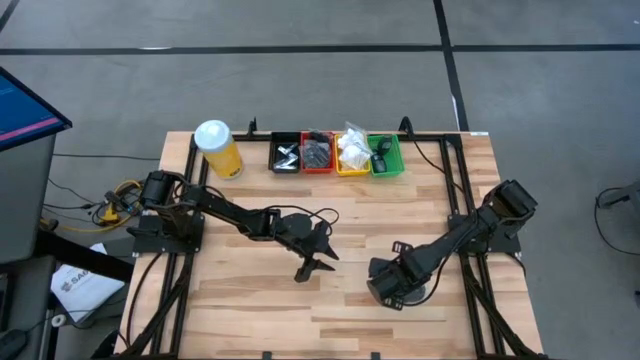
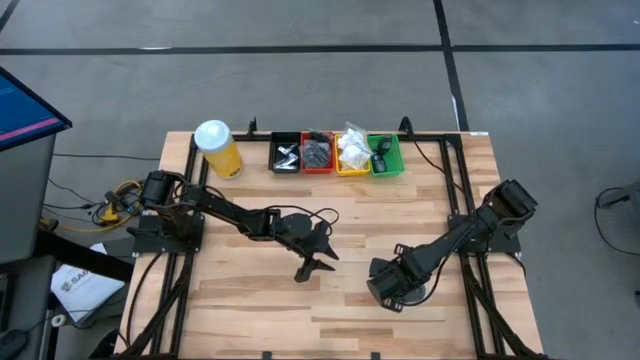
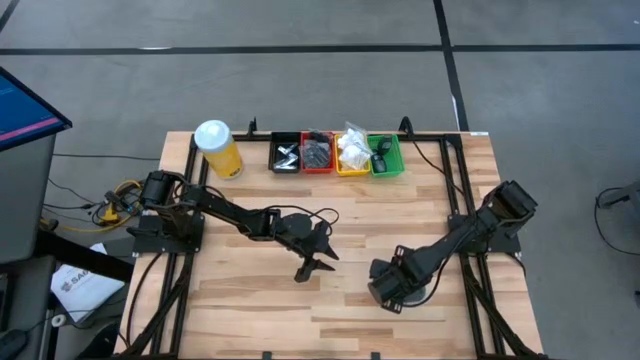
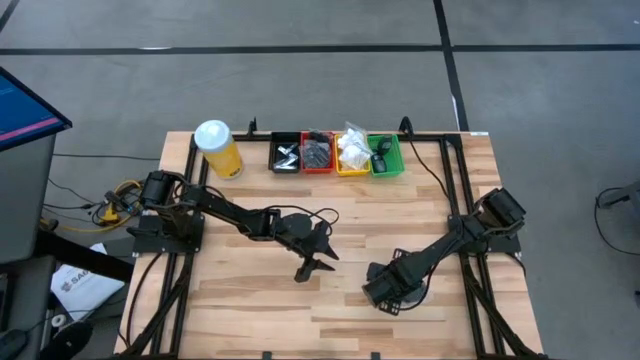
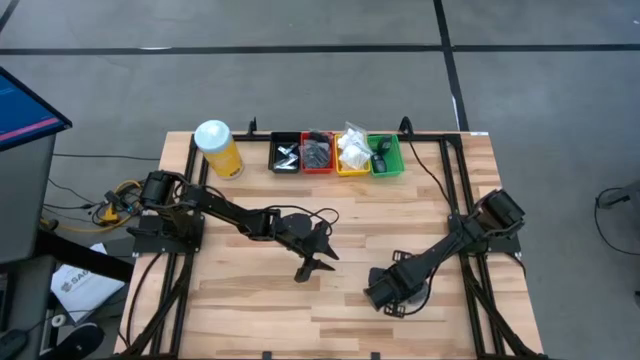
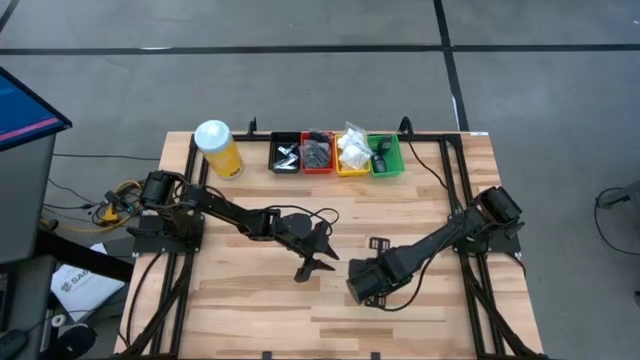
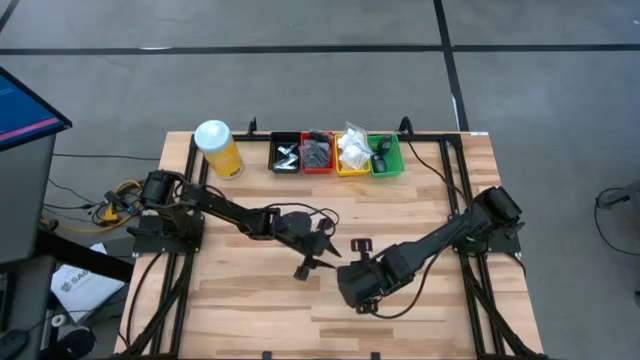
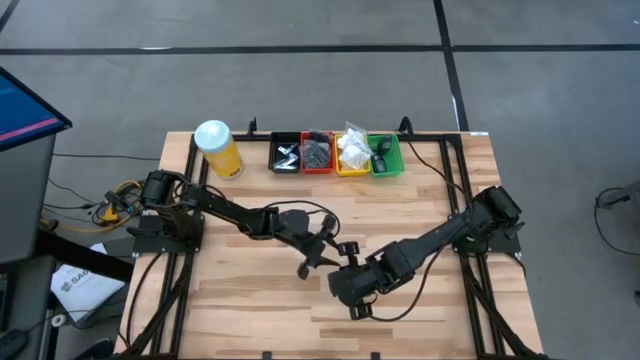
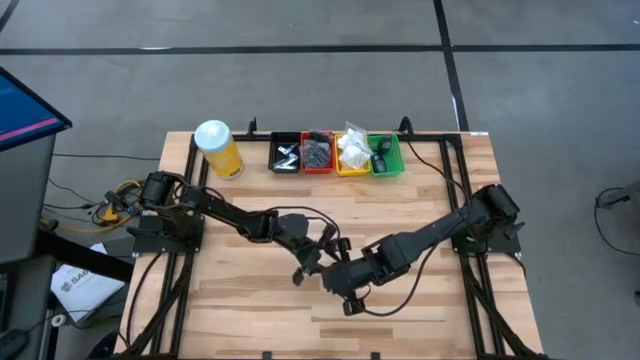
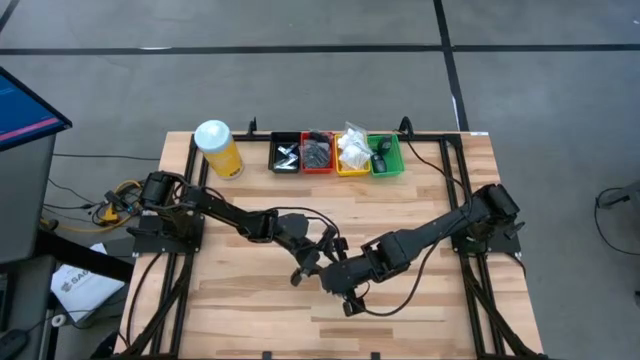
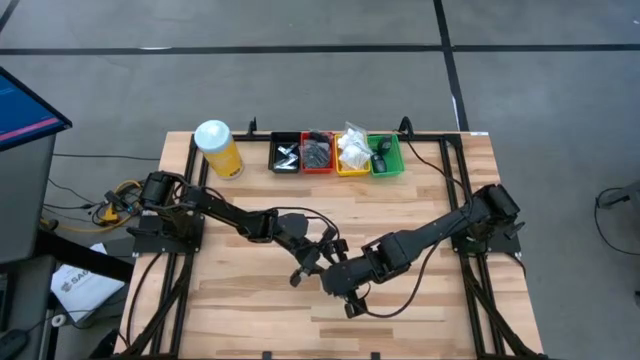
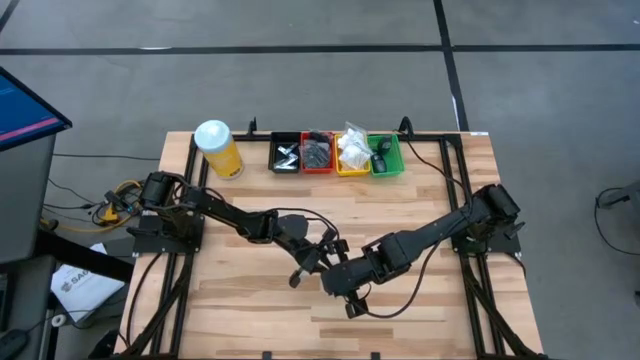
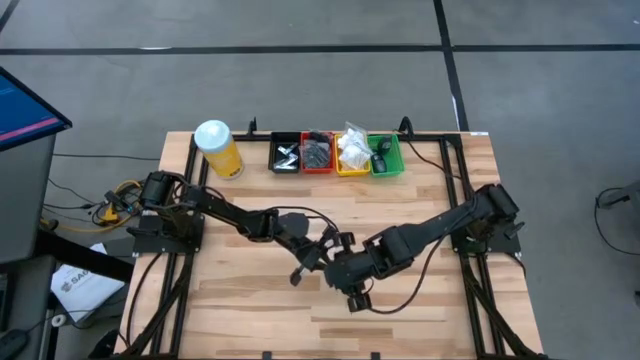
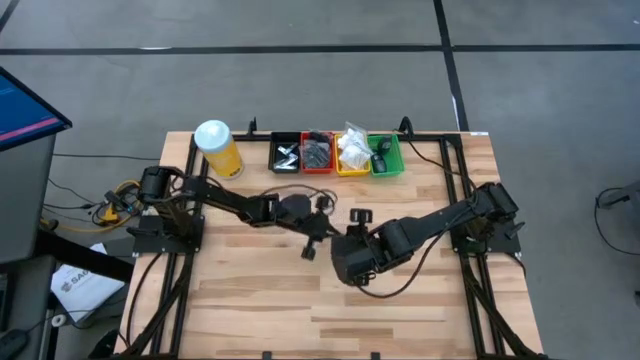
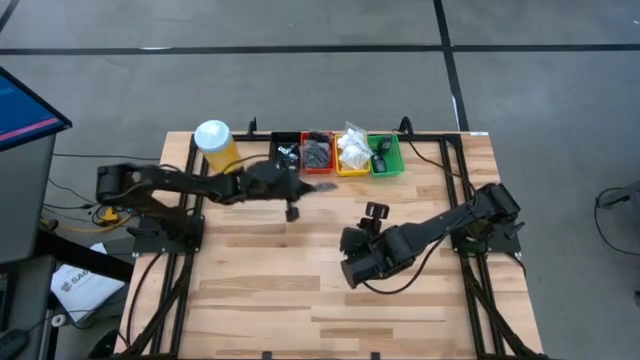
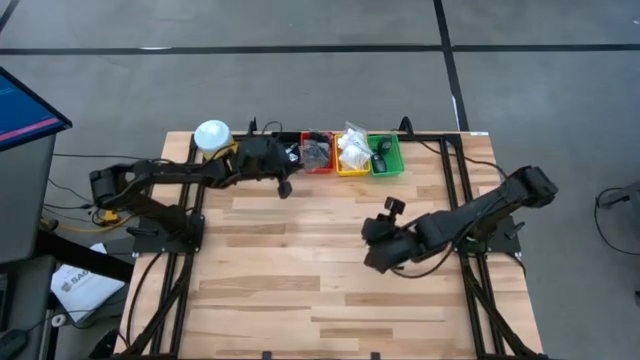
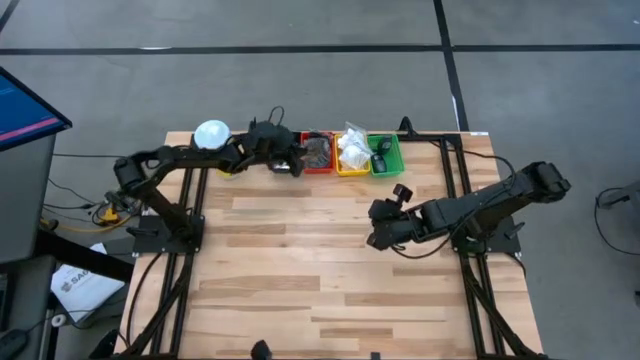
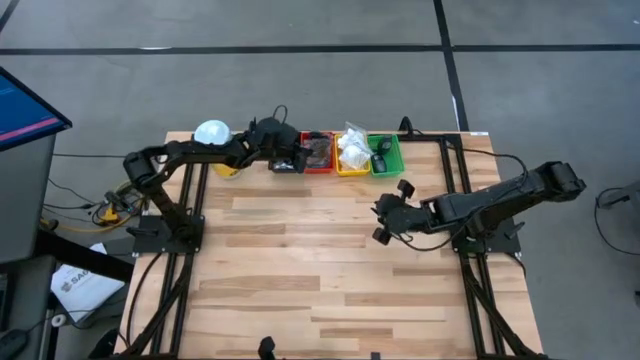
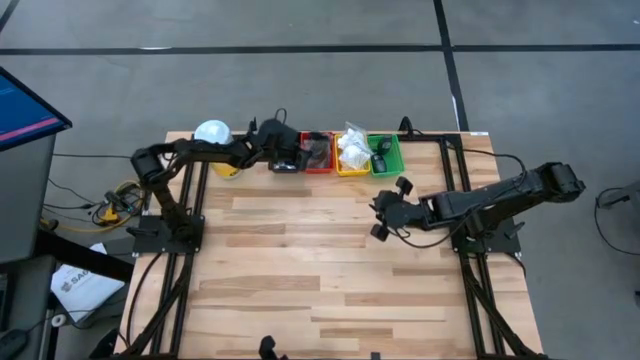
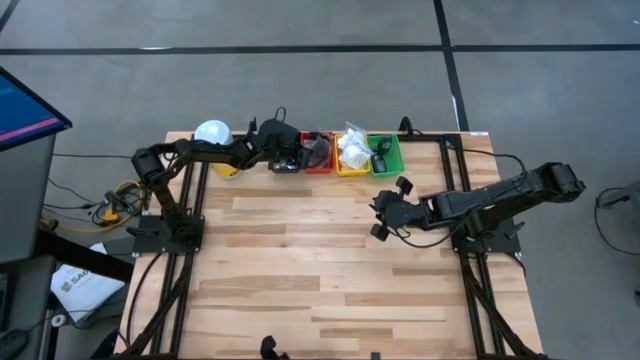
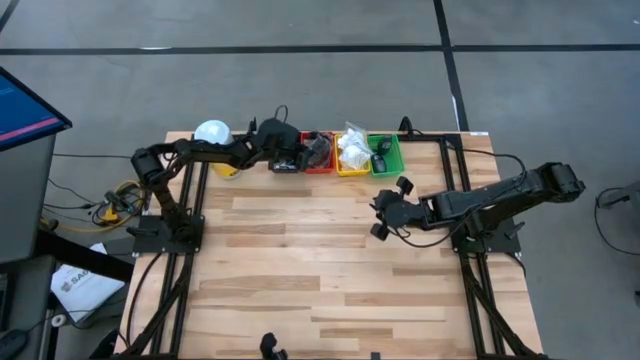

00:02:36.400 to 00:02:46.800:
Task: Pick & Place Travel size toiletries
Put the hairbrush into the red bin

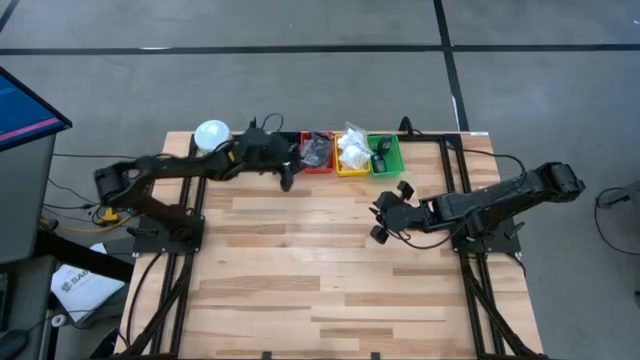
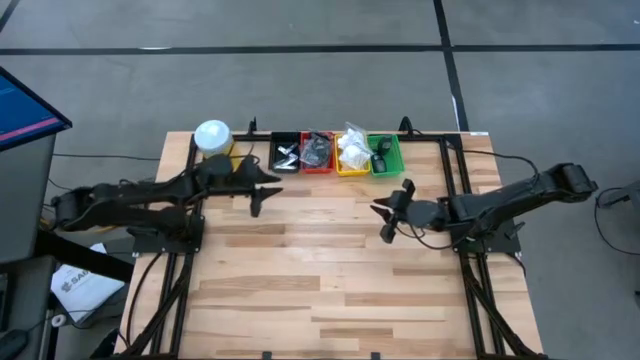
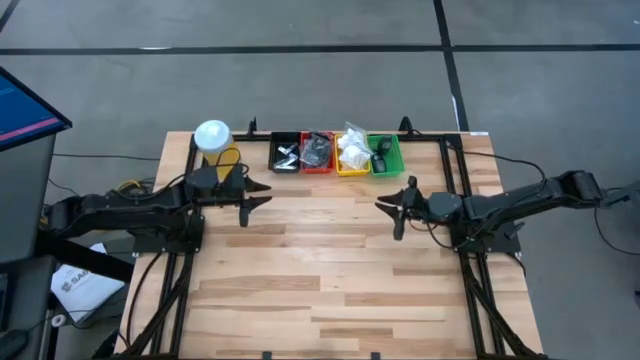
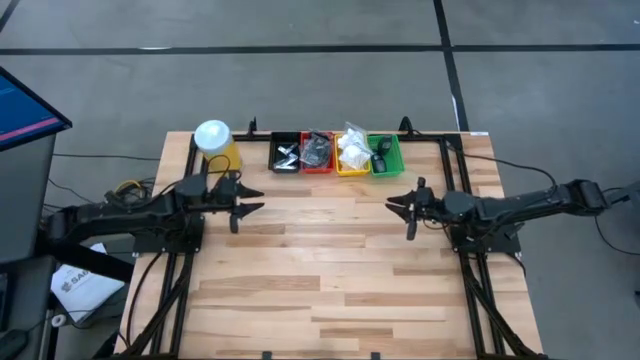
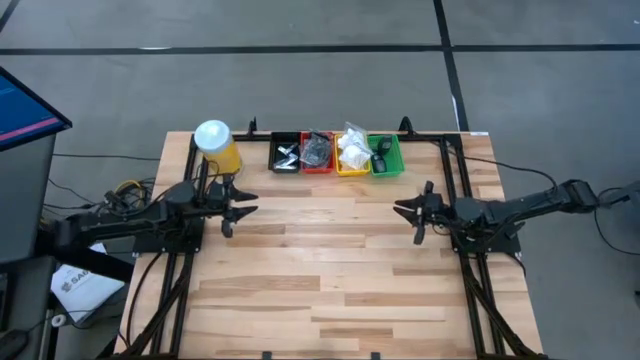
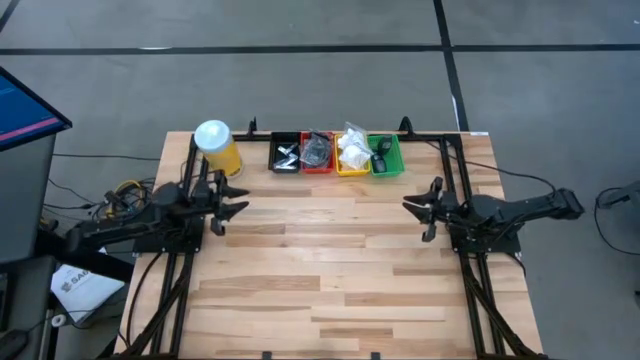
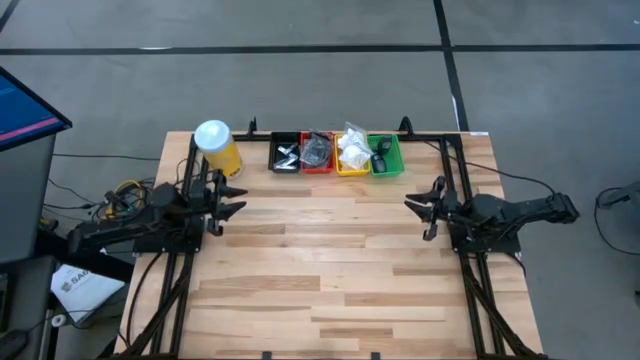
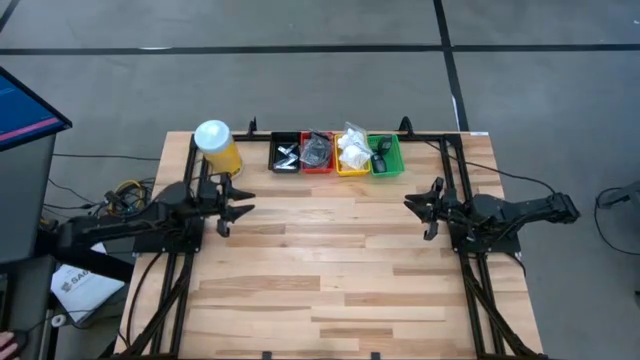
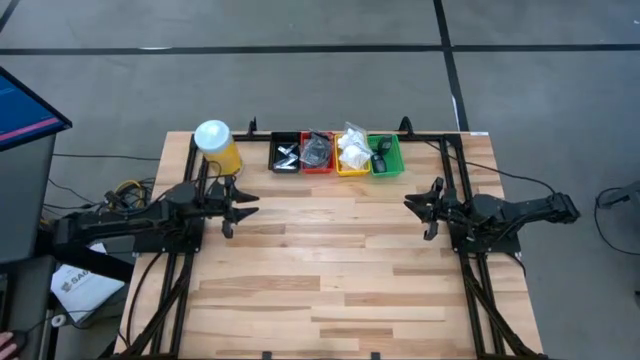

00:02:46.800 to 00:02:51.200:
Return to Home Position

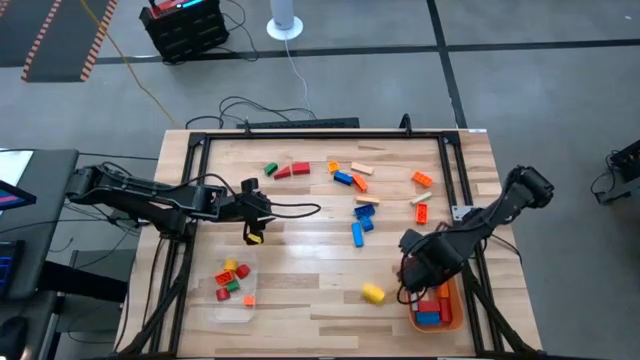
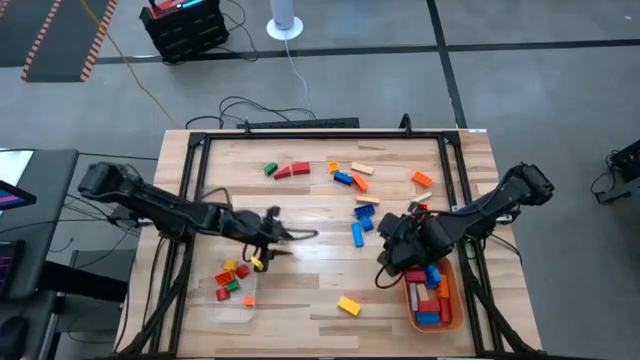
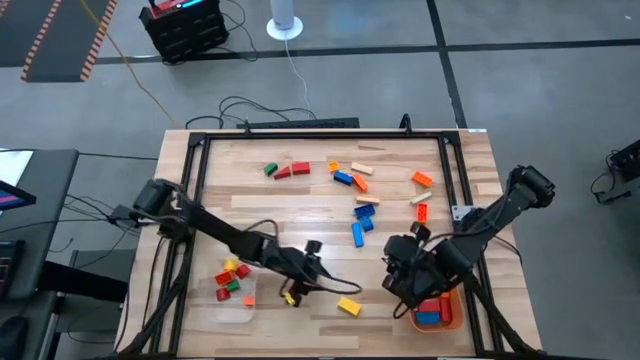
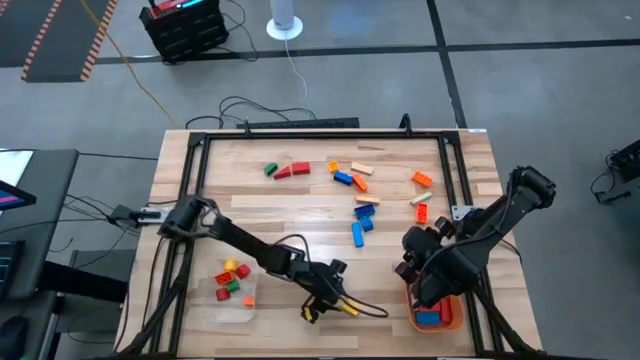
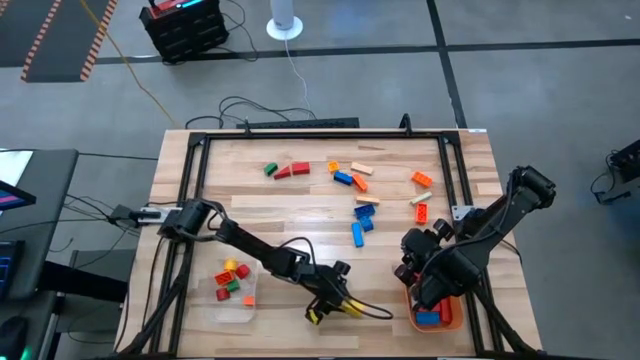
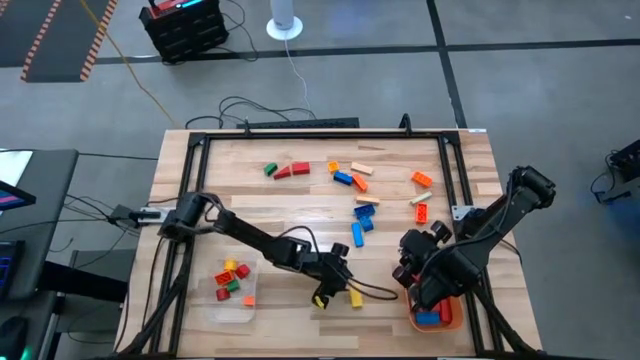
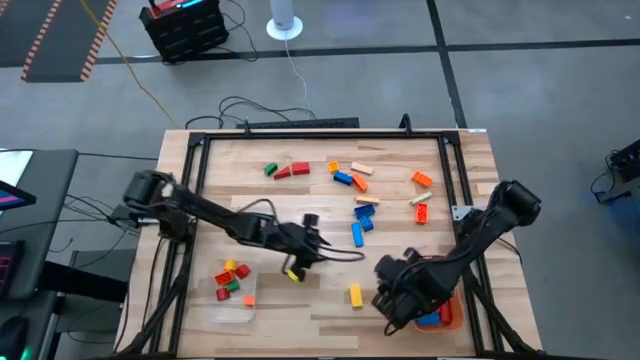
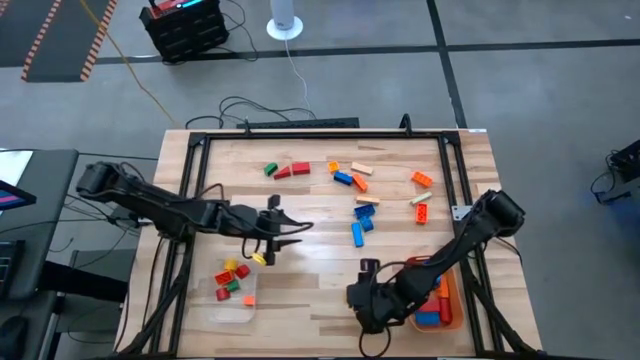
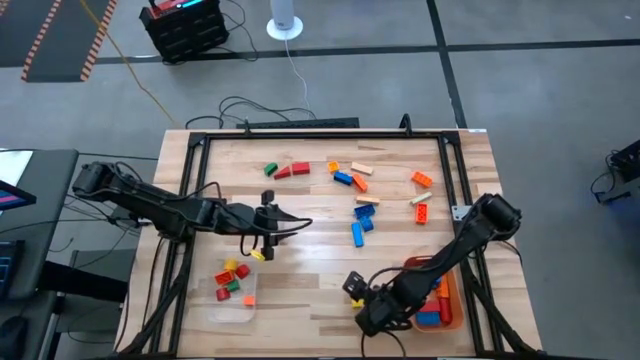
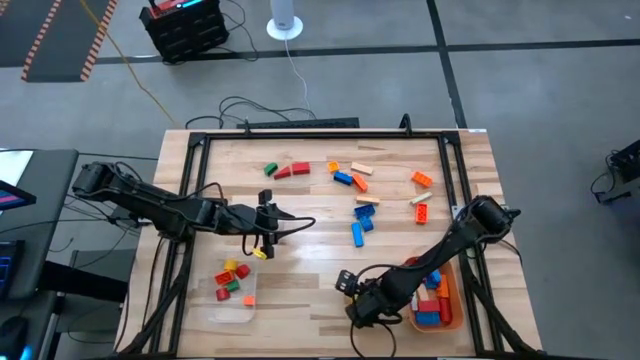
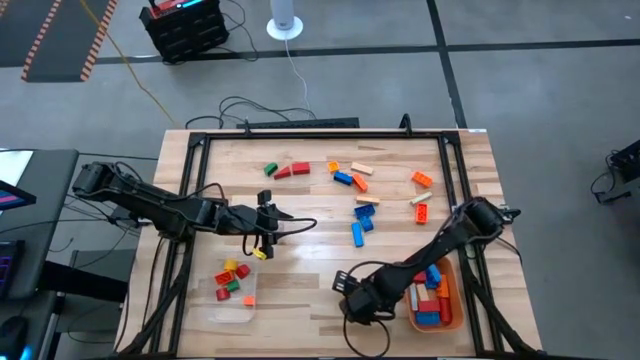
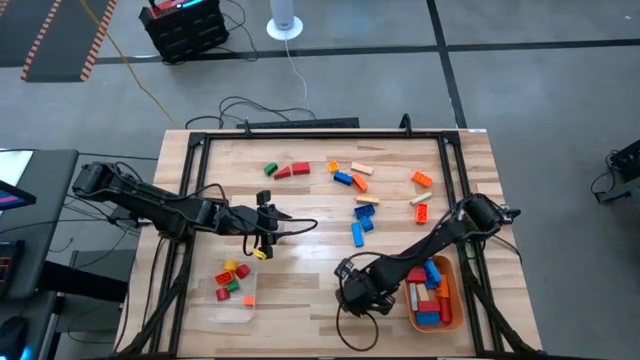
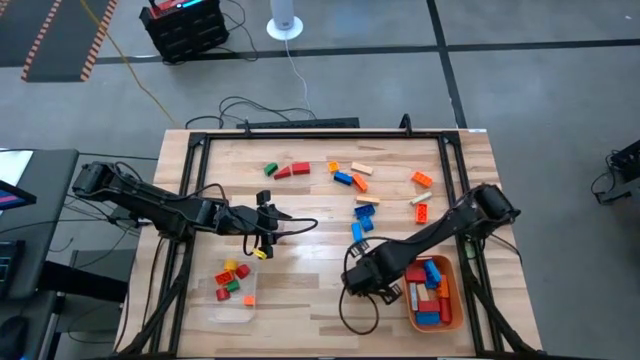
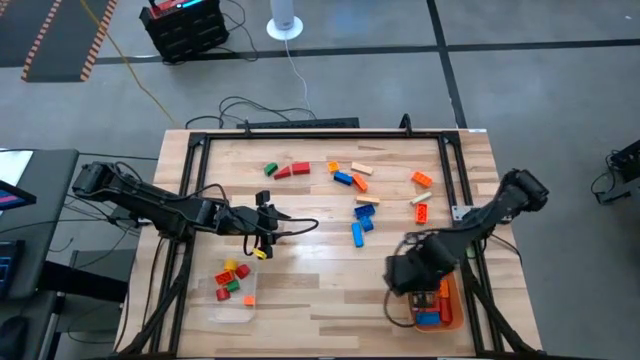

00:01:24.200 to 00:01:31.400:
Task: Sort blocks by size
Put the large yellow block into the orange bin
